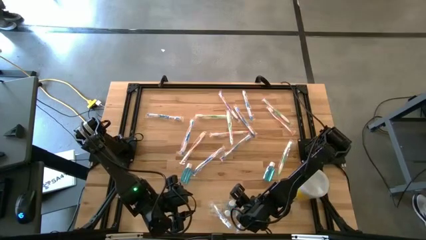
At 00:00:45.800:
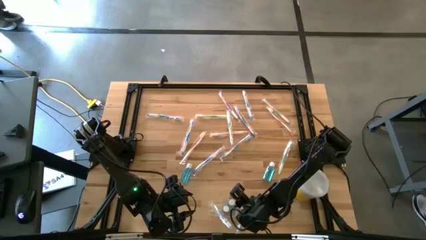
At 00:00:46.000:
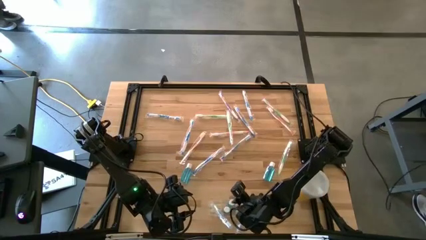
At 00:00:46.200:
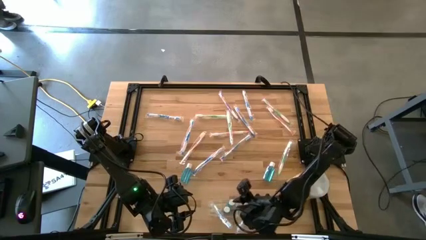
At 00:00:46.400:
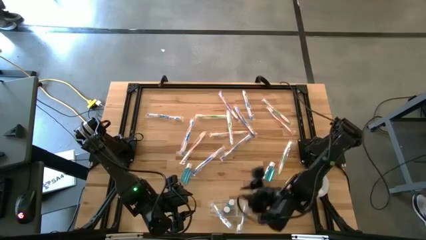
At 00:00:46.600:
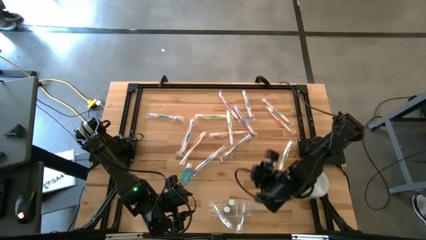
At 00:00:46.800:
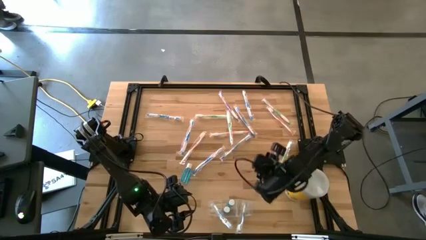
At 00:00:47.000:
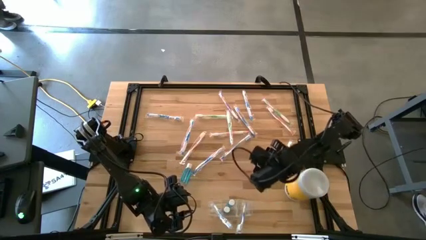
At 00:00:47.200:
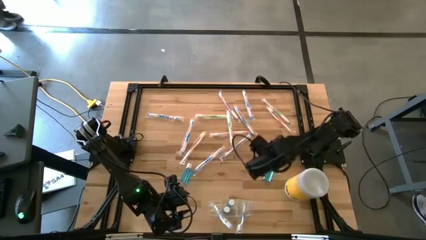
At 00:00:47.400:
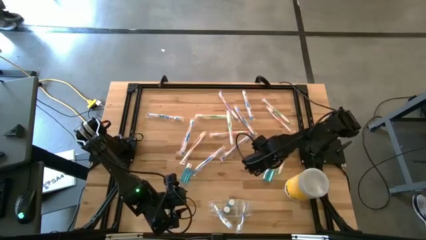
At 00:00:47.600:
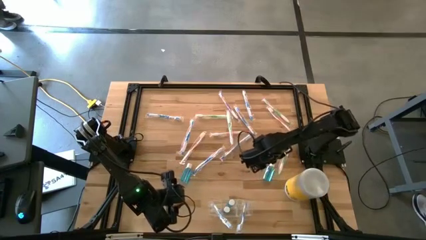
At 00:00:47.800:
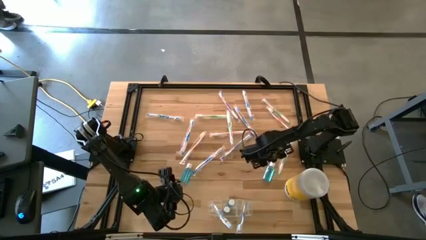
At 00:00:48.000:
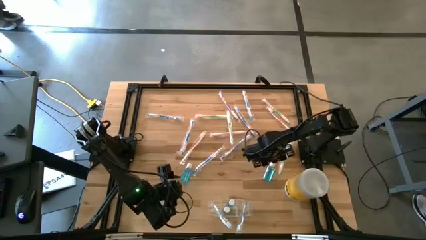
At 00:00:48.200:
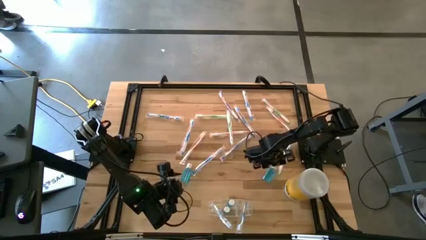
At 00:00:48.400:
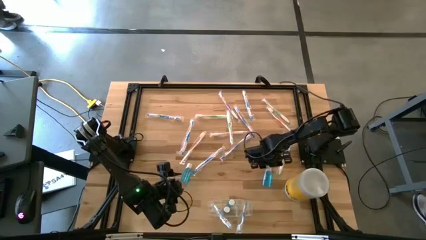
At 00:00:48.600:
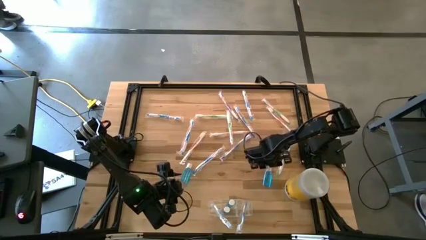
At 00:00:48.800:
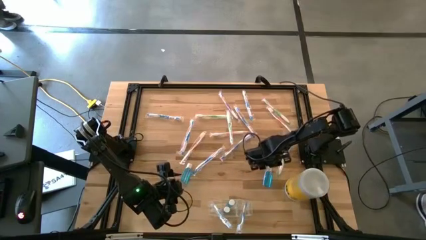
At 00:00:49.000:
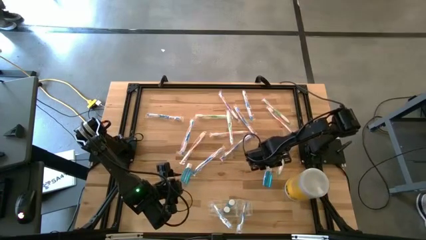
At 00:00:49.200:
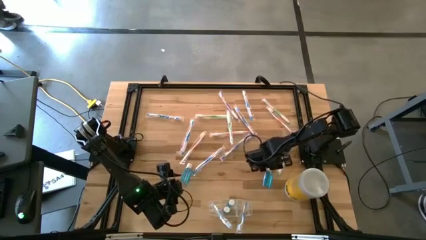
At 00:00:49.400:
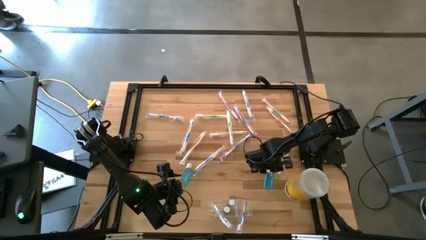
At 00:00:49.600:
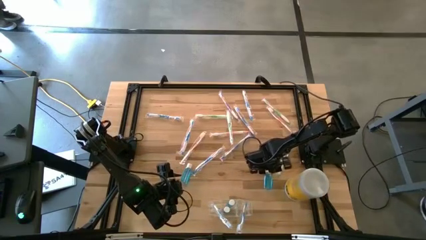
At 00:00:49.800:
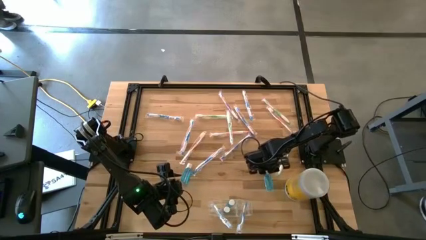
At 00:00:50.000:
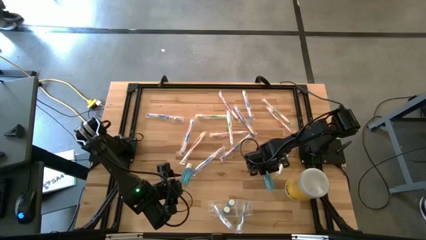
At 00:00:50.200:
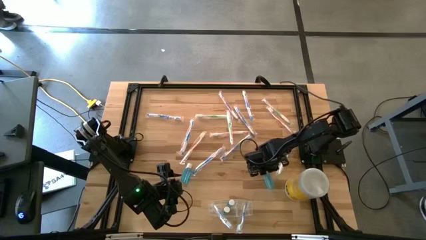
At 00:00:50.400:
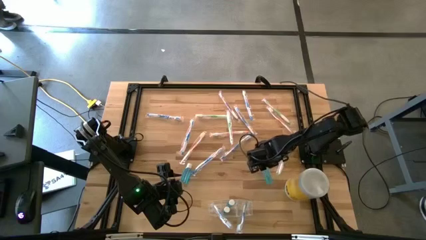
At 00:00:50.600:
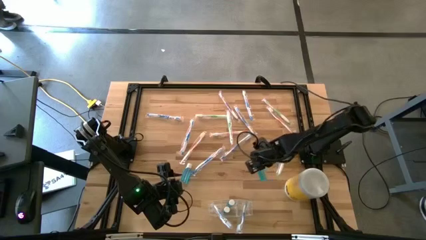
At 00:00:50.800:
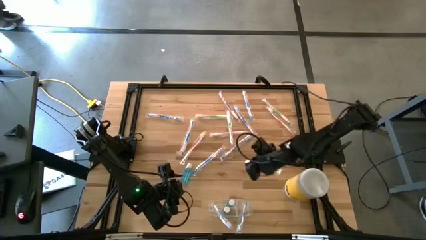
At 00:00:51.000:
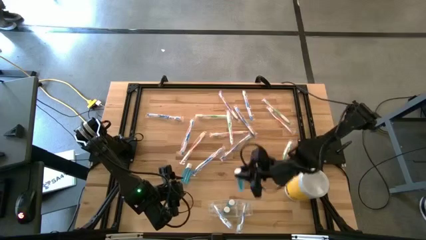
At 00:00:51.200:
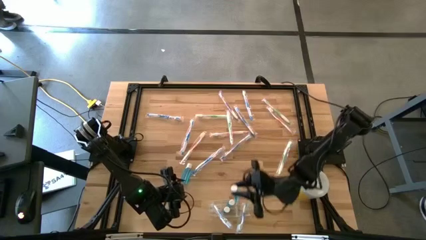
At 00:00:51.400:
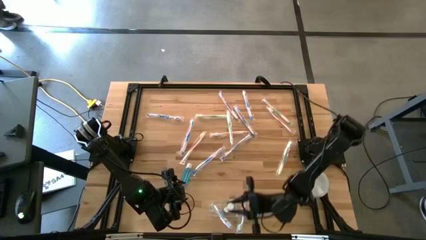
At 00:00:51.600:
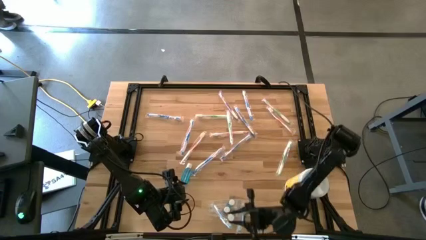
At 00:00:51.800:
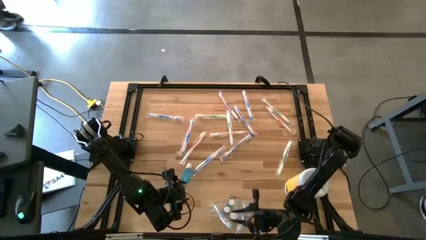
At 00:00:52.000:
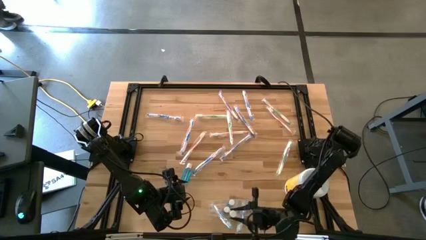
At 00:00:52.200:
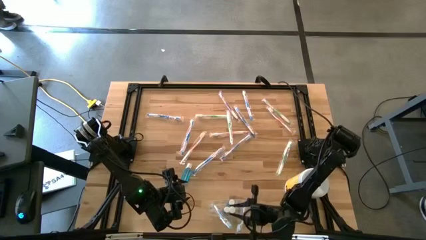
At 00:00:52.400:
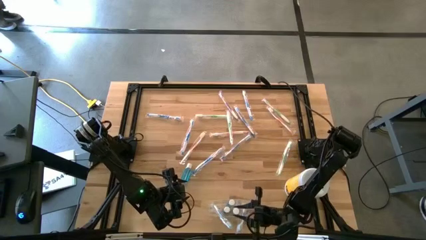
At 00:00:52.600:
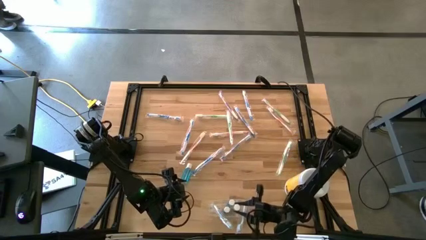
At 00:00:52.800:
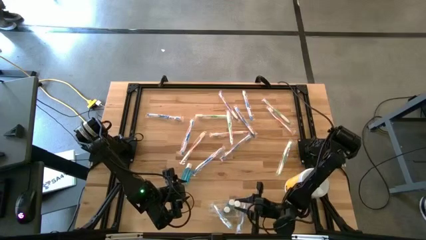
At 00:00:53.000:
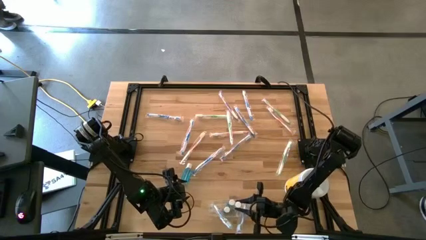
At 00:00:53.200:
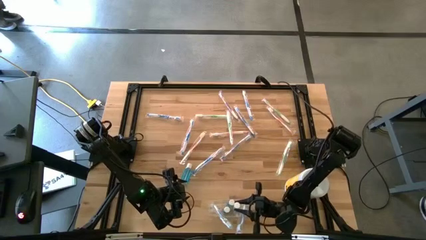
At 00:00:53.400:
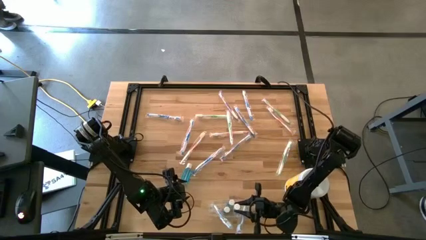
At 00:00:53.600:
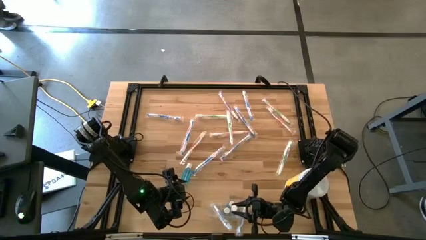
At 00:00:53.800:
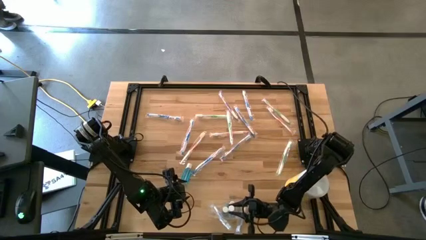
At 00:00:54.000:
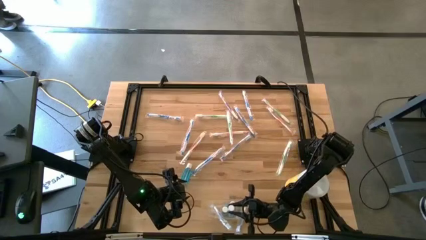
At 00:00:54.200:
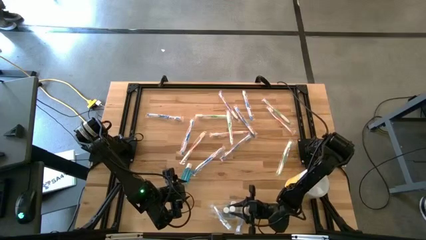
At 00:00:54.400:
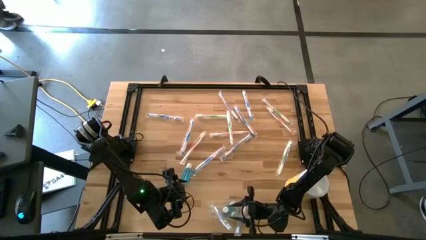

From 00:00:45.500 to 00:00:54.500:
Task: Pick & Place toothbrushing station
Put the mouthwash into the transparent organizer

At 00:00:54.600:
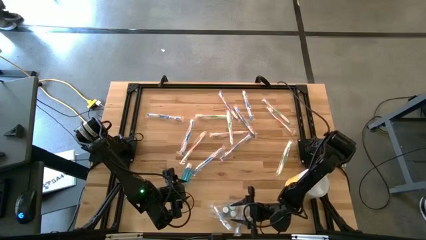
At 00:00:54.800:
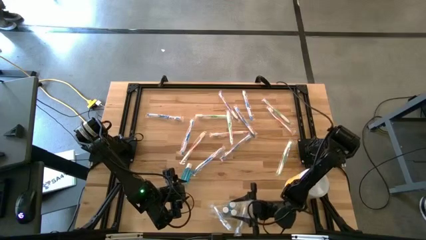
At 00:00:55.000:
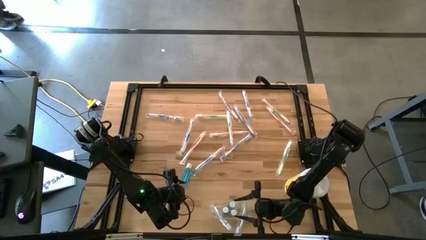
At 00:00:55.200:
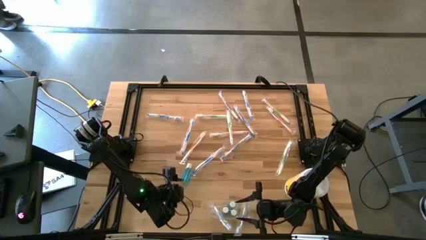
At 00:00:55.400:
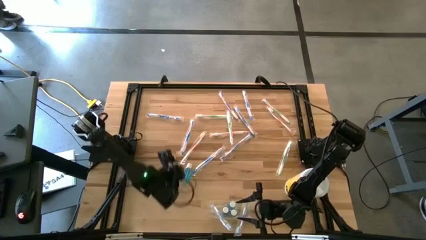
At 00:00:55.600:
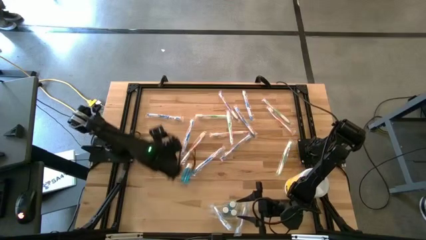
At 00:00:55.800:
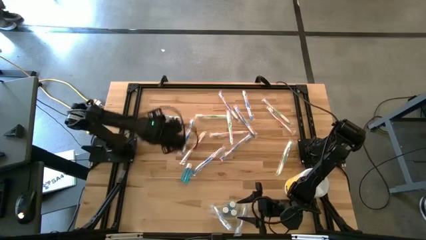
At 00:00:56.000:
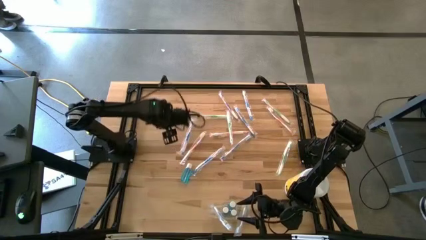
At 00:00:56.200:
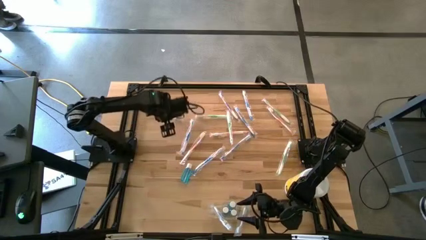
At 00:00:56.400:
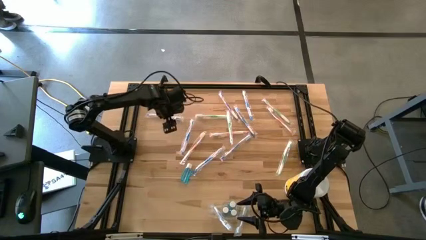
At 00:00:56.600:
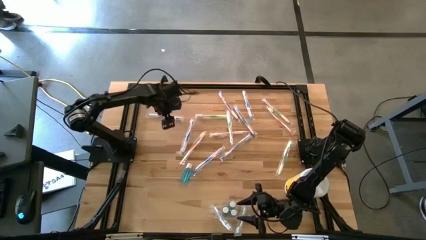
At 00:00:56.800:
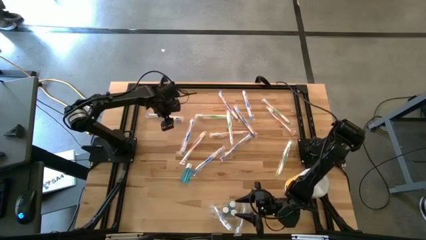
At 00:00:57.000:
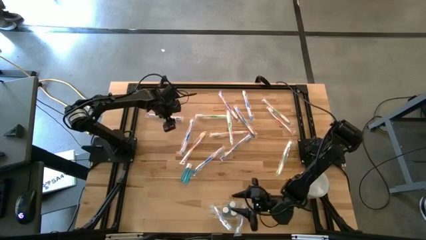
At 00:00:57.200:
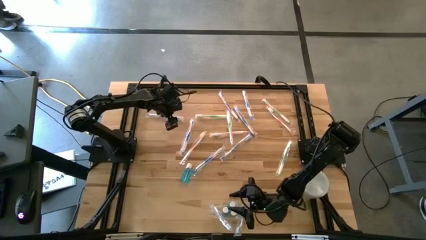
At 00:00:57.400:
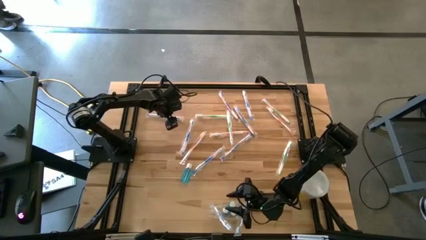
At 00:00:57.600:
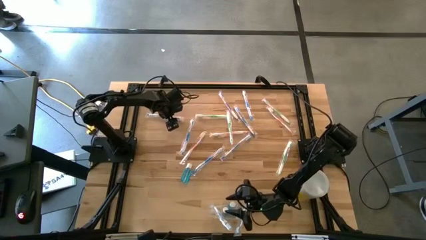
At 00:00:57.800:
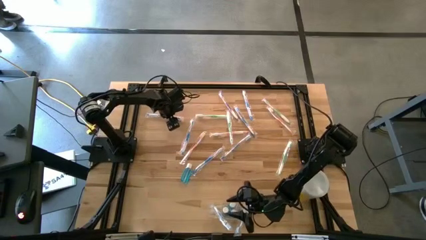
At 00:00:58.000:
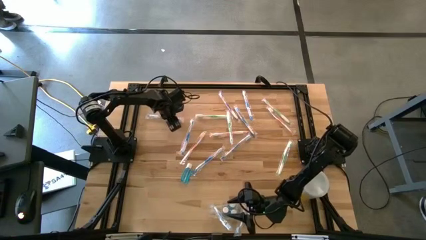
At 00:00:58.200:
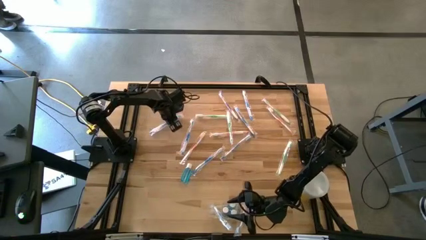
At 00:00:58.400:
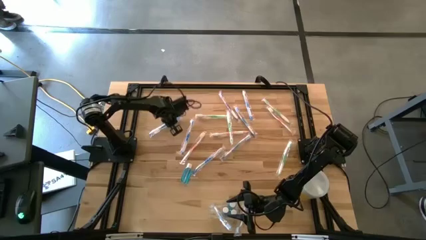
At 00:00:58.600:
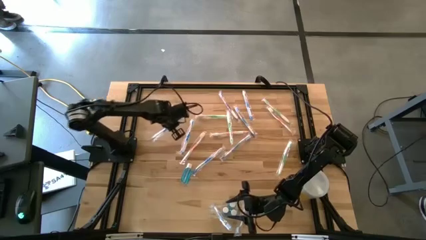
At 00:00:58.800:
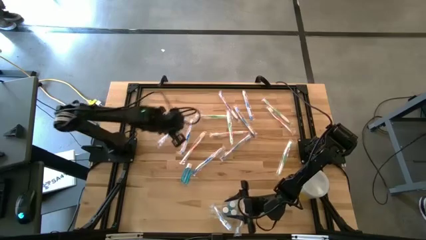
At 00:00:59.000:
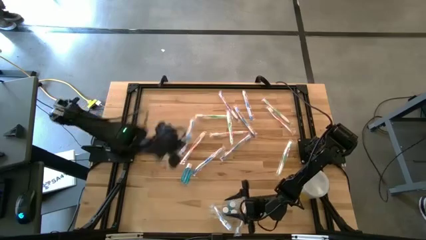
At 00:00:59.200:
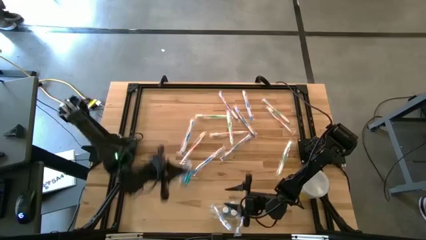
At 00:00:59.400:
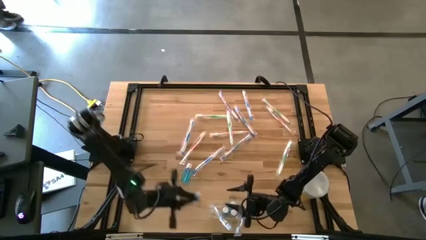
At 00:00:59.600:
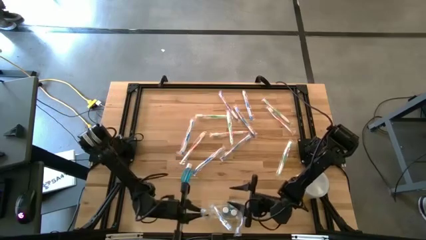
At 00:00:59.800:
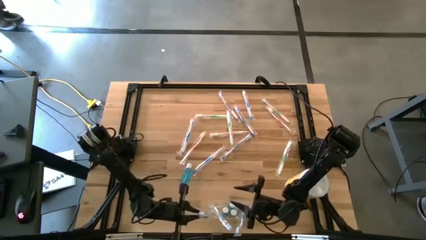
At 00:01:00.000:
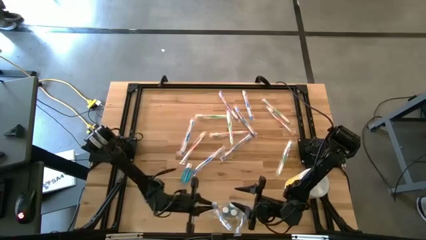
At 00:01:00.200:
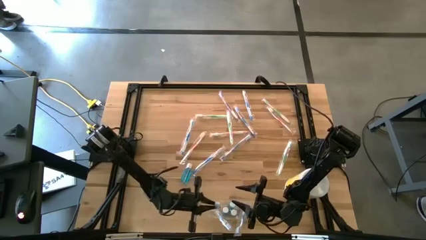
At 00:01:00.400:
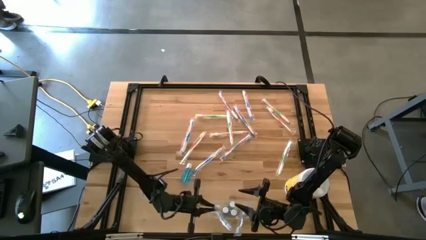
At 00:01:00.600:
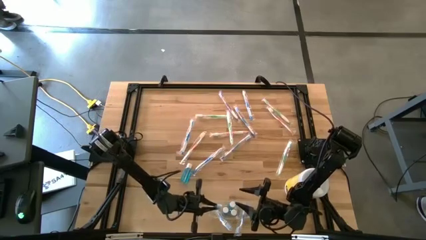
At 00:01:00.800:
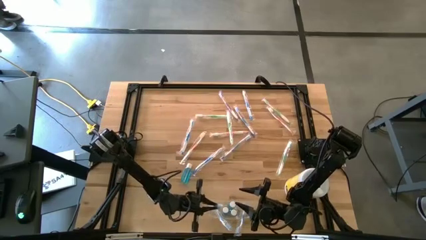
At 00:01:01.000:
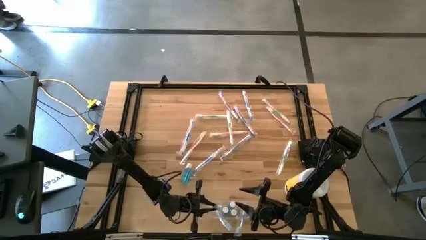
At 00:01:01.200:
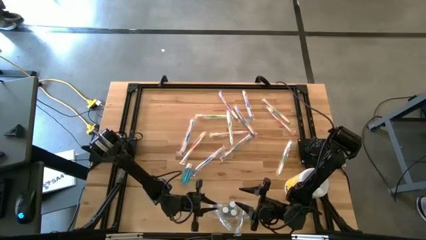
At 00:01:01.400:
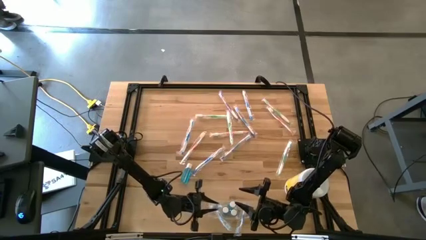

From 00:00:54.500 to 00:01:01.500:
Put the blue toothbrush into the transparent organizer
